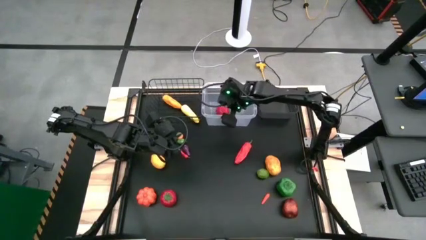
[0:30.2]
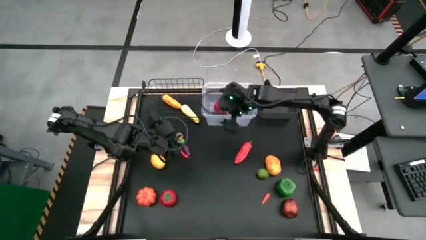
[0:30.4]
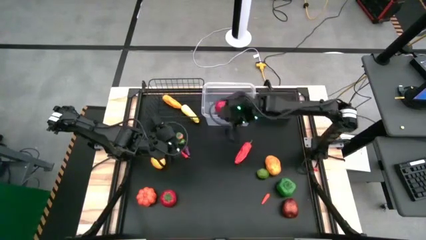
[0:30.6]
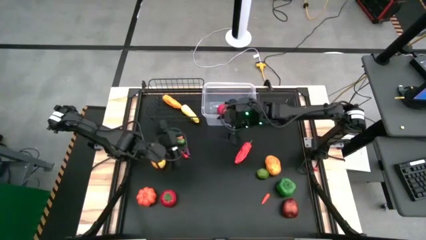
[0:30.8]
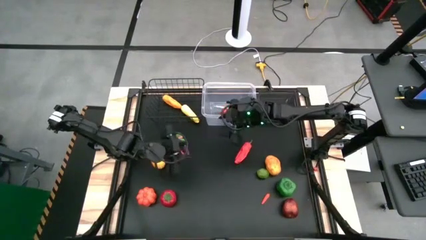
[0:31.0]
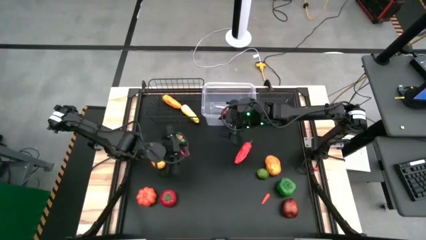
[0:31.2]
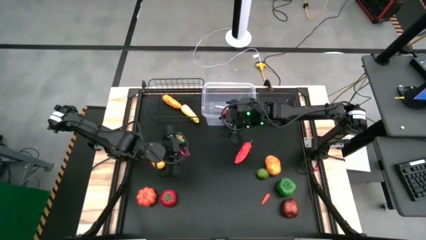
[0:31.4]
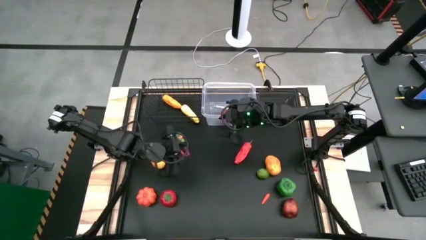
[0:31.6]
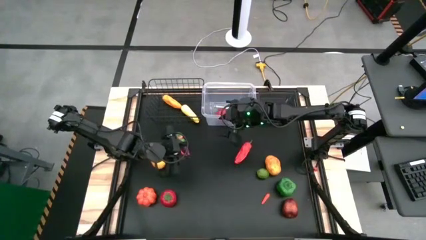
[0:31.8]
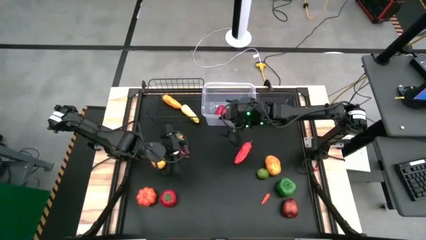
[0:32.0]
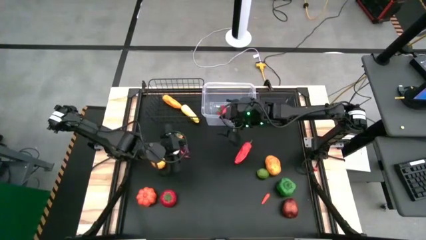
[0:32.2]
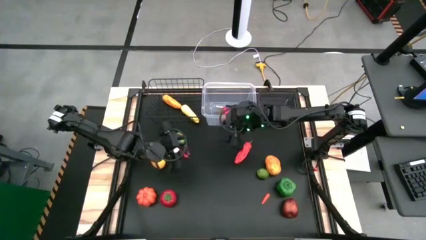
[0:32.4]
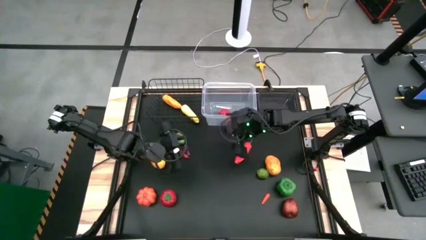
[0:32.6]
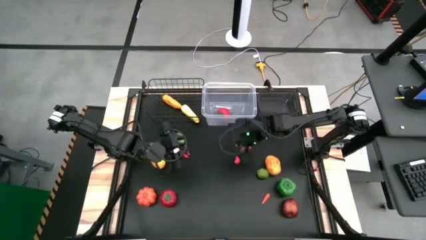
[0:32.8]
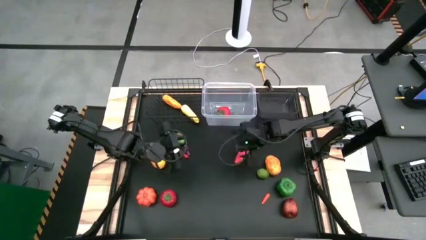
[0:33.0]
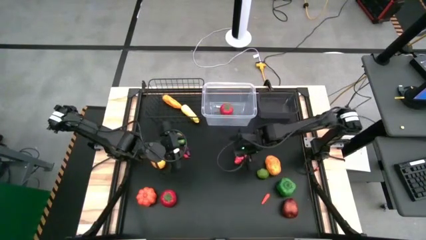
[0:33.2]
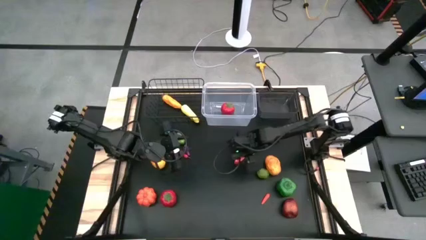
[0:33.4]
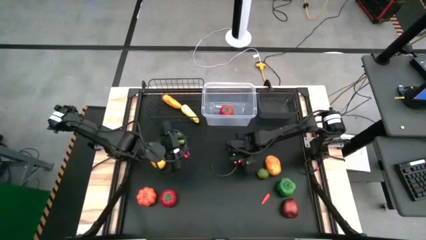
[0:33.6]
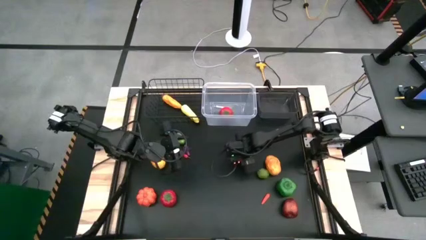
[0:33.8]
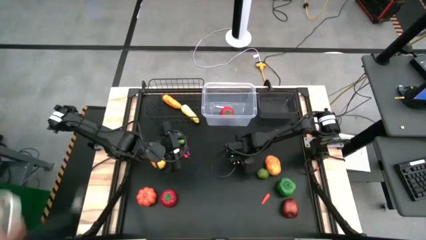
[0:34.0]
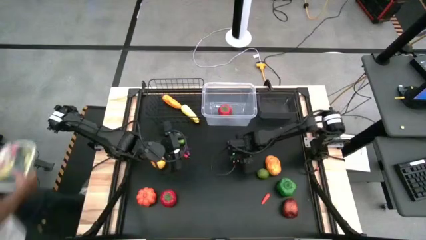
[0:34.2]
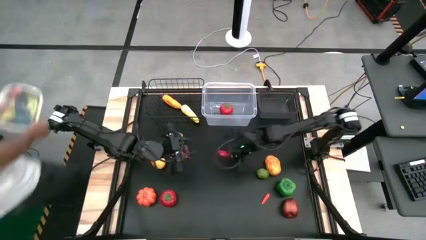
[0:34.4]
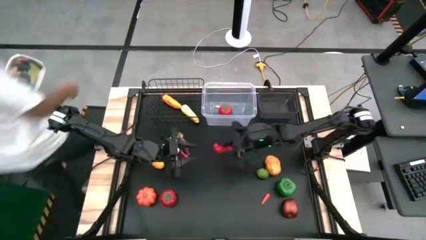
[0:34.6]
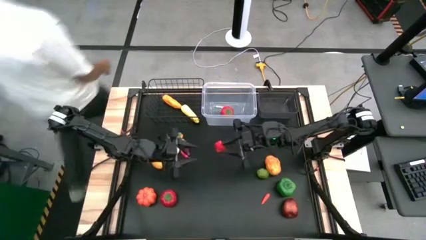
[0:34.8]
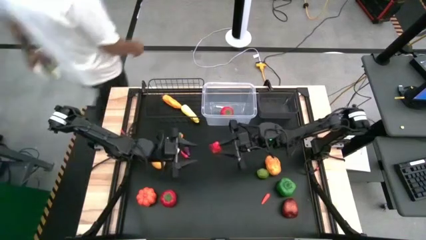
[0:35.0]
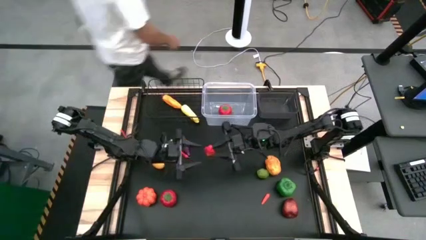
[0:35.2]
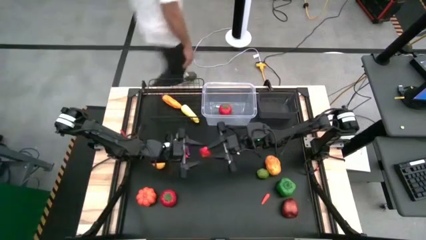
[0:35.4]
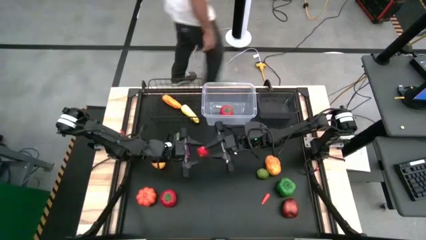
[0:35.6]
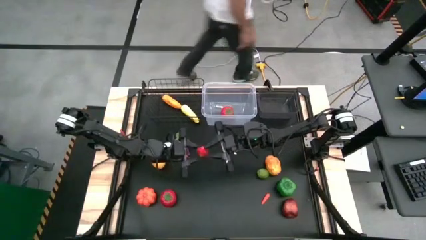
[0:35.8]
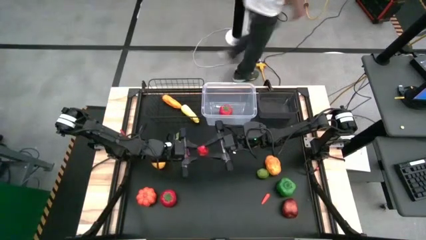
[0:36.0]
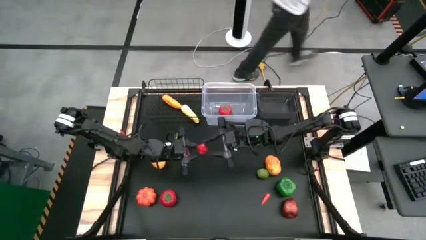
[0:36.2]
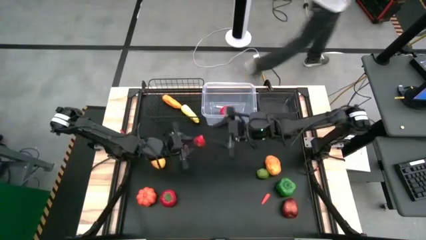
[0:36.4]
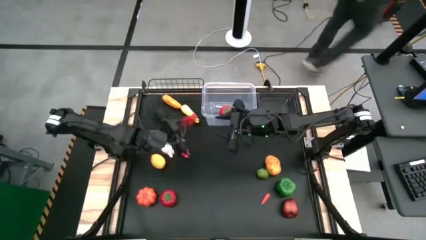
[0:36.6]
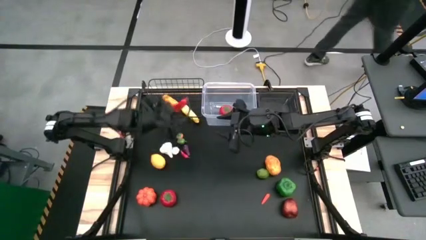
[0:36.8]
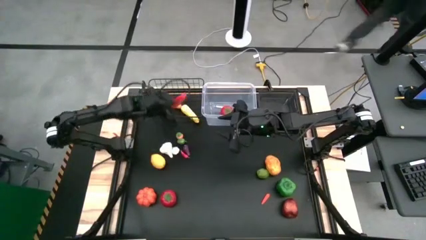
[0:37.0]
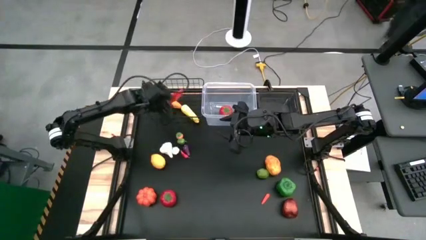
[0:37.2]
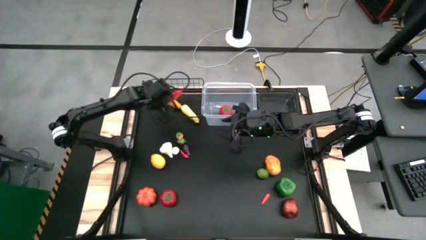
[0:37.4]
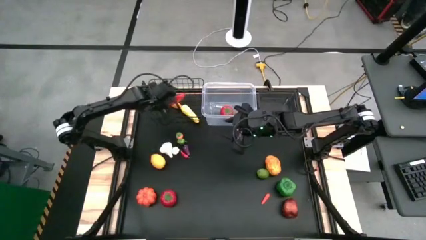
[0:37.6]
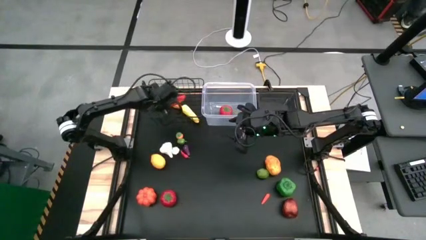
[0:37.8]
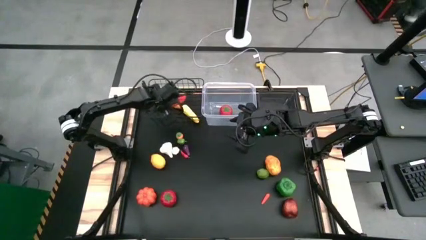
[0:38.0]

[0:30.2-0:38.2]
Task: Sort produce into baskets
Put the large red chili pepper into the wire basket

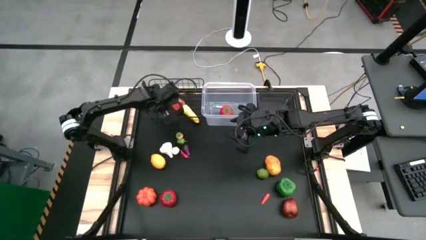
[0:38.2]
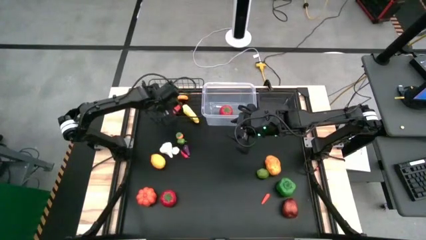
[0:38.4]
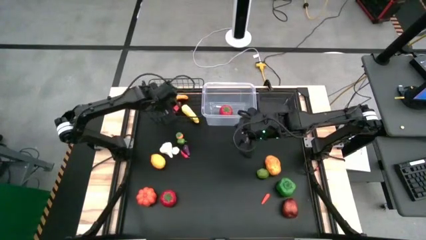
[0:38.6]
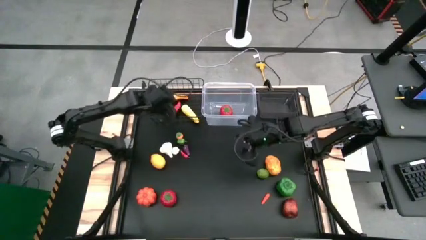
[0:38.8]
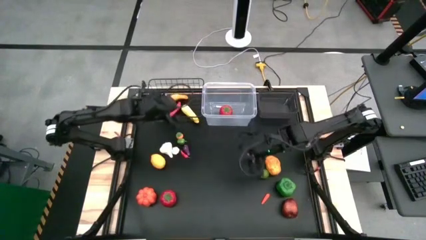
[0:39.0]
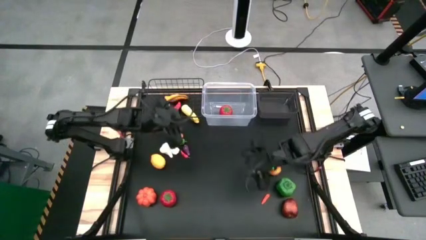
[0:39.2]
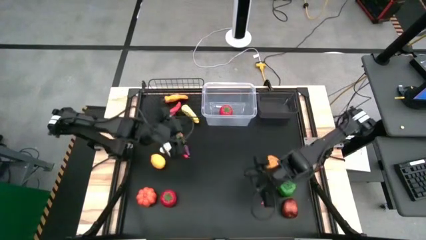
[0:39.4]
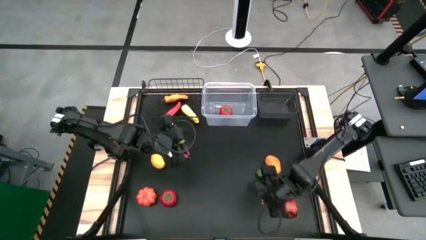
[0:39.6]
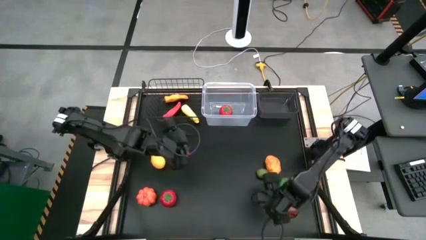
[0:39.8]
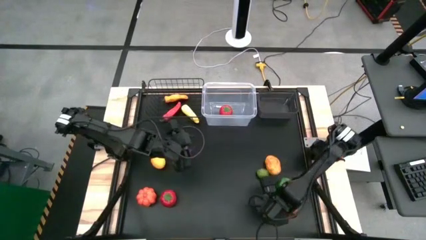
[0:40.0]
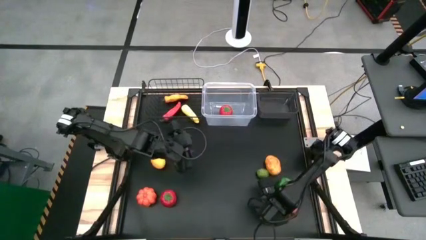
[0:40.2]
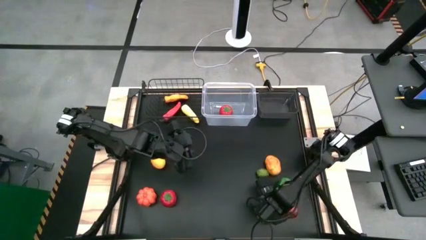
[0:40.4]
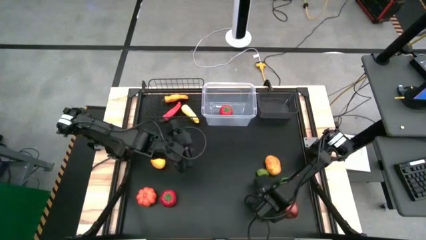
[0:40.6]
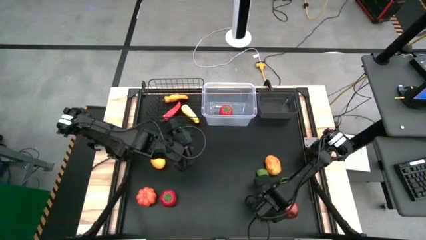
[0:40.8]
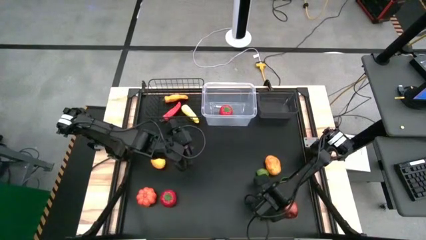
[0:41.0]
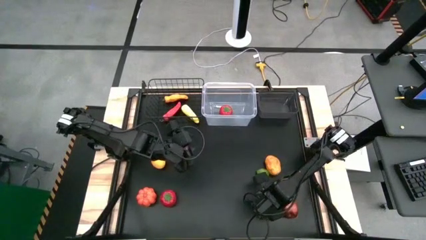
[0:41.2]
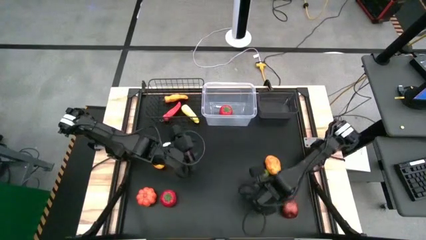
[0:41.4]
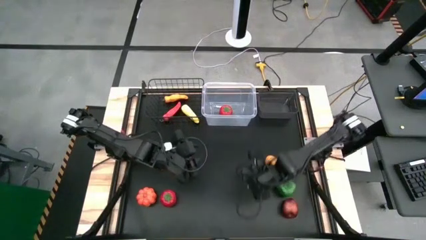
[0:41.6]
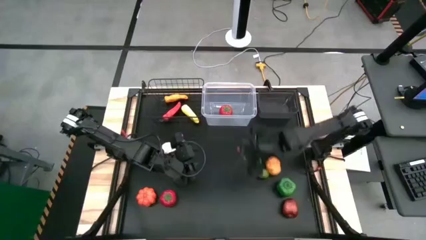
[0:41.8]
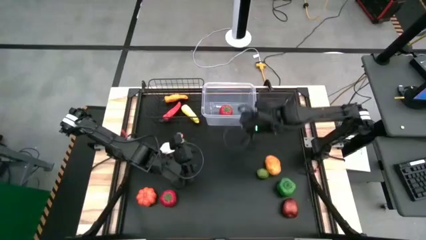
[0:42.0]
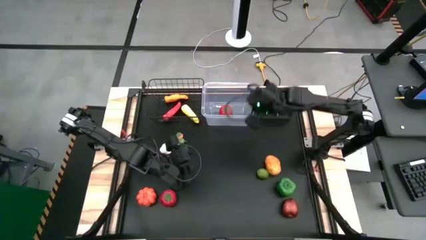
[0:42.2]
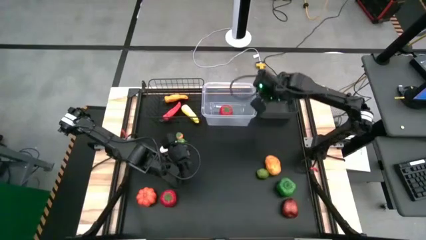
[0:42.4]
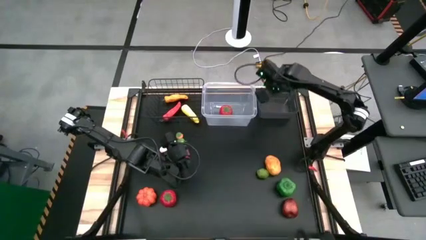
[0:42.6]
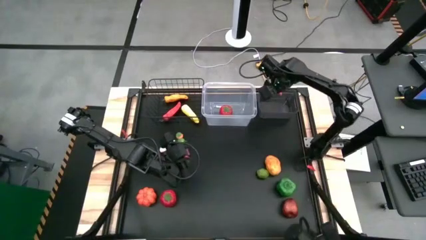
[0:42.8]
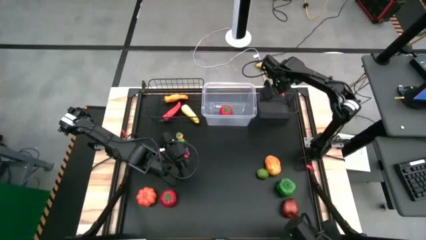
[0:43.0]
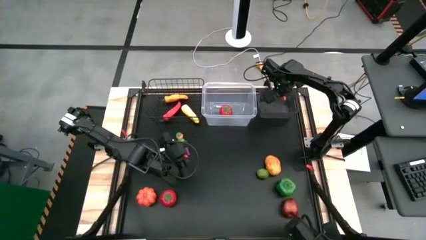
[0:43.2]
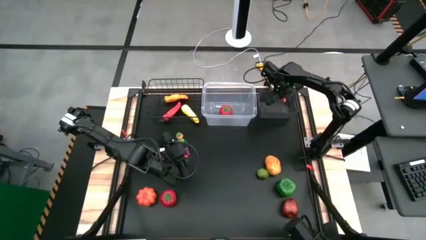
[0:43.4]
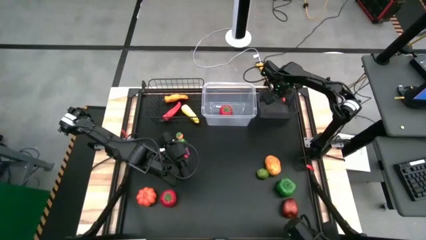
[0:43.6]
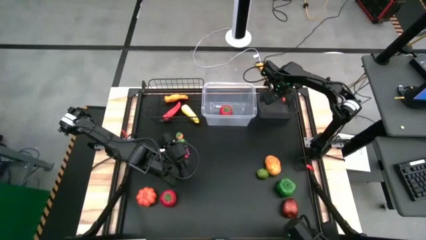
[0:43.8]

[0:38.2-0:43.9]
Put the small orange chili pepper into the black bin

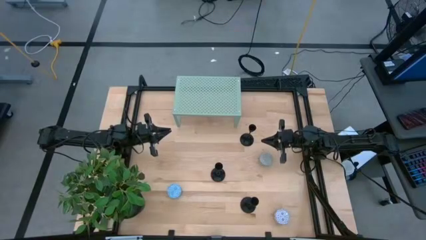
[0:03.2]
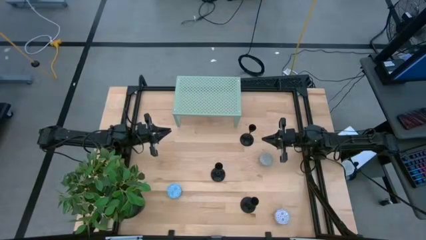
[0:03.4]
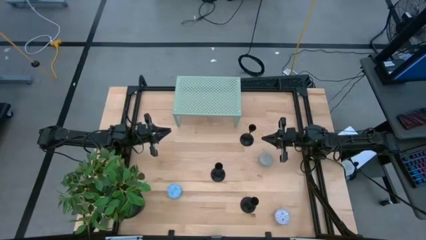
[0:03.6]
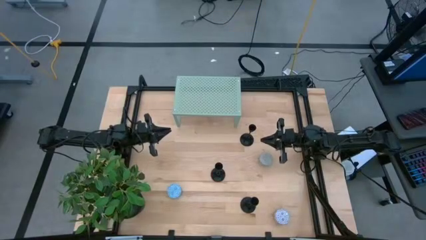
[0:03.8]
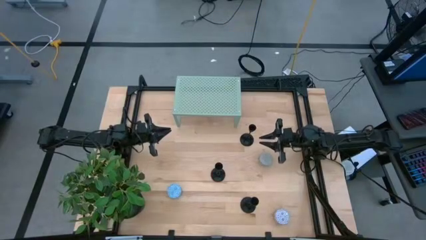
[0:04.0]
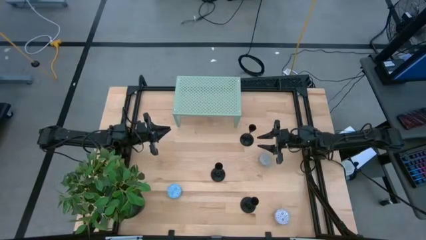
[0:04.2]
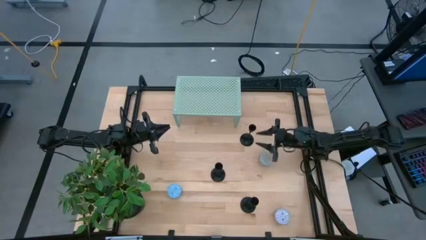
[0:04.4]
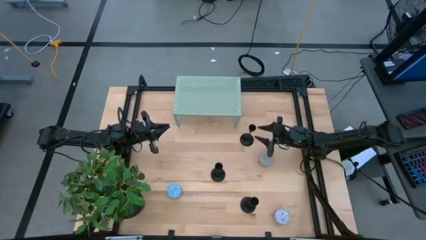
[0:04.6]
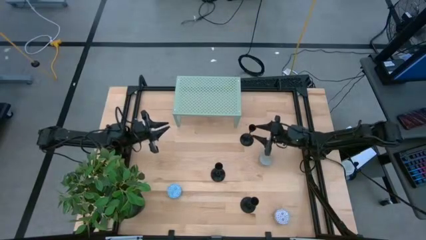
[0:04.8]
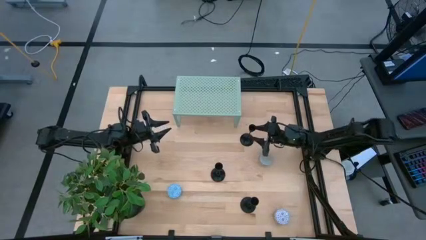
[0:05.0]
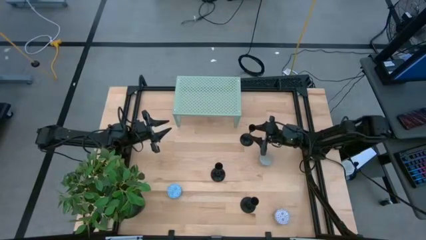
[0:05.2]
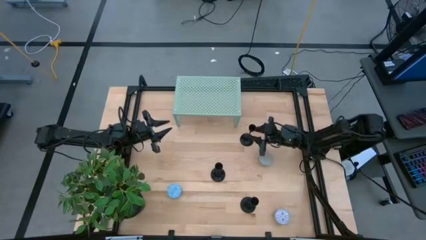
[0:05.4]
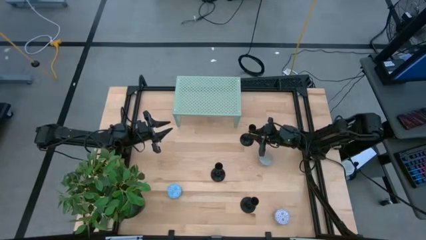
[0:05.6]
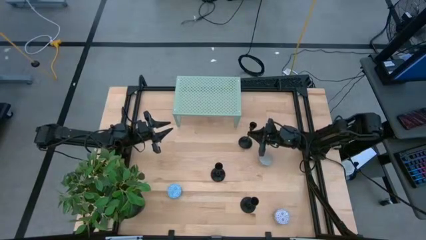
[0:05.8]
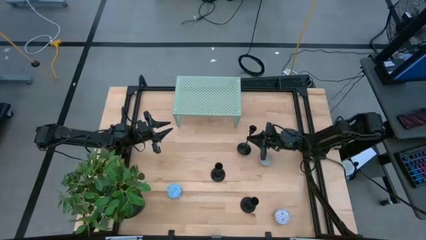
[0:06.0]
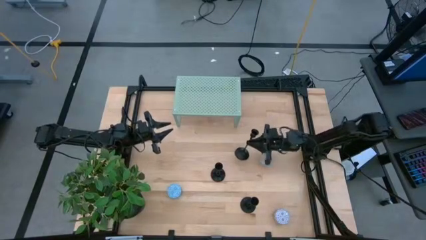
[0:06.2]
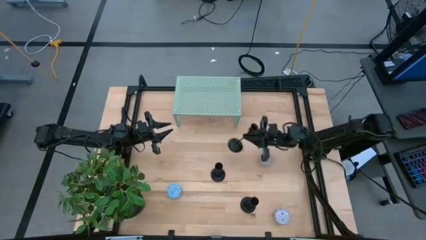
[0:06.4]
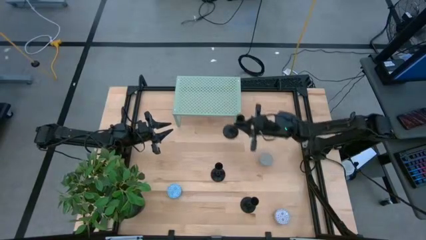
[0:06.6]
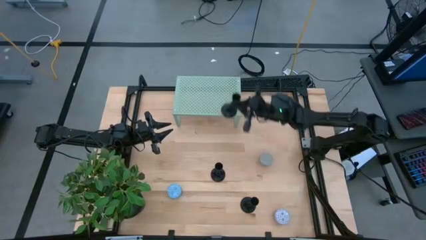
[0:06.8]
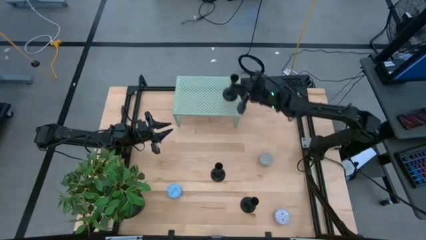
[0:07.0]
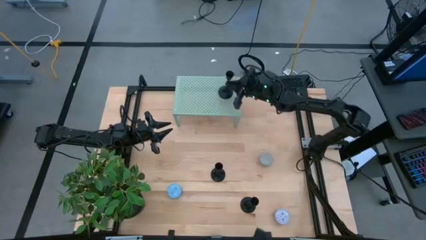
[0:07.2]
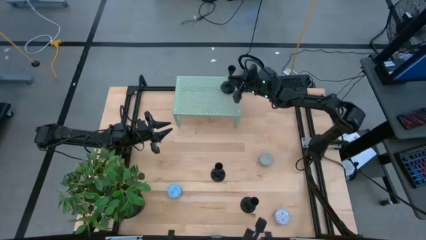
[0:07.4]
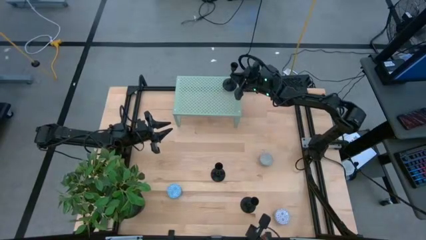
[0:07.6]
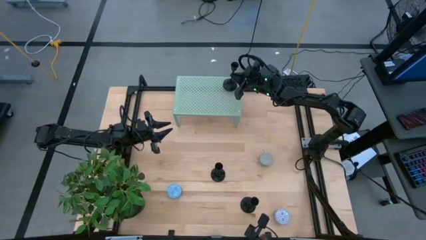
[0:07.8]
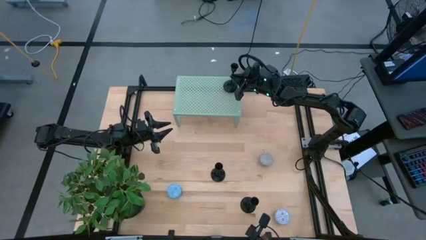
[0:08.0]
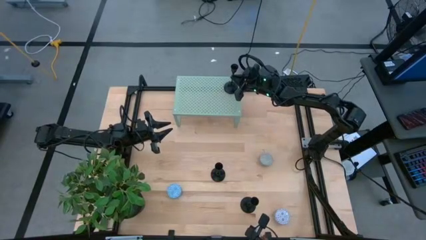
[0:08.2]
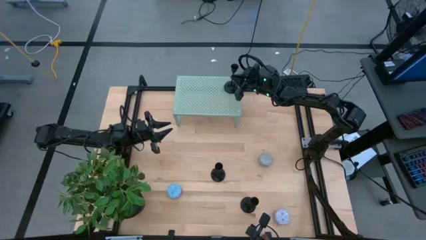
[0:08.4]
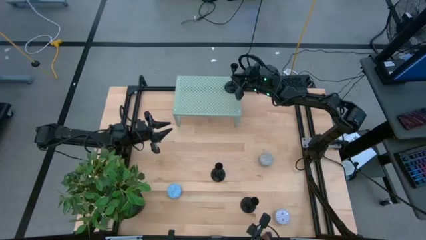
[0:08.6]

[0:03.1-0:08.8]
Task: Pick & Place candle stick holders
Put the top black candle holder on the shelf
